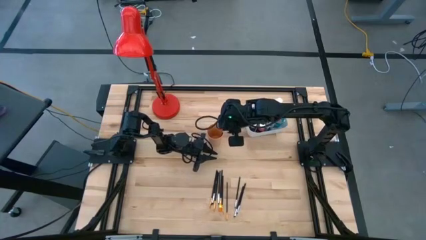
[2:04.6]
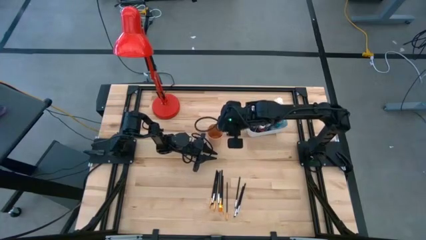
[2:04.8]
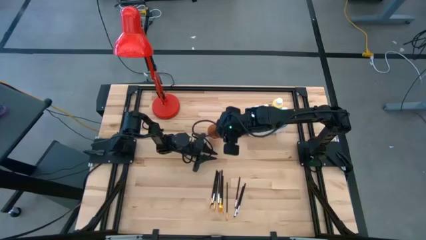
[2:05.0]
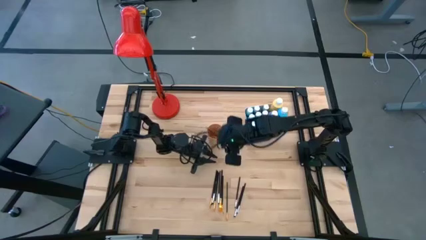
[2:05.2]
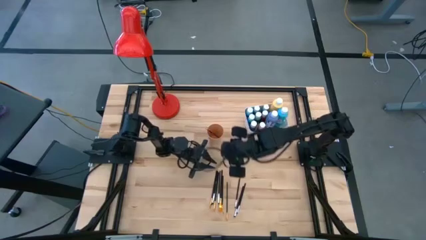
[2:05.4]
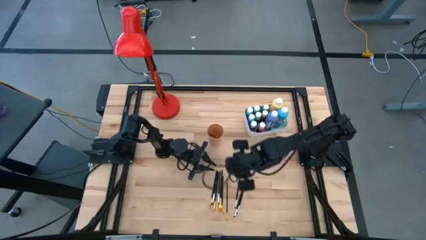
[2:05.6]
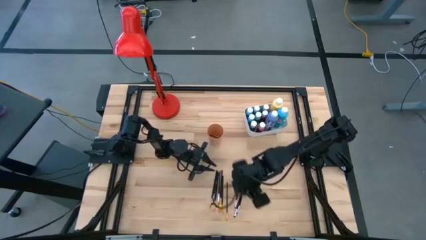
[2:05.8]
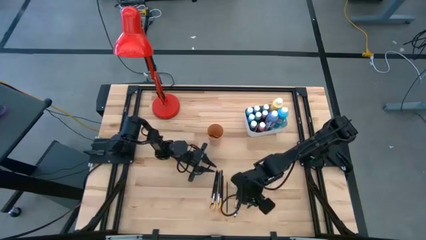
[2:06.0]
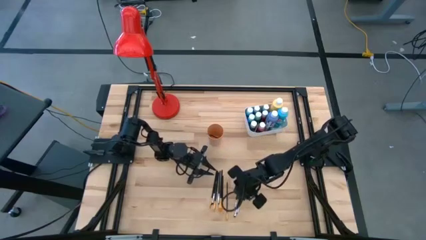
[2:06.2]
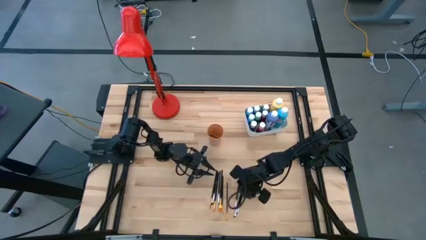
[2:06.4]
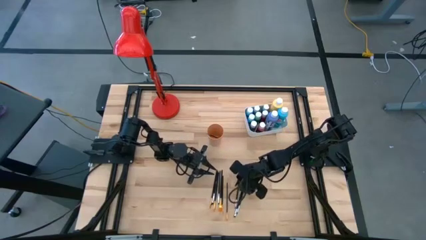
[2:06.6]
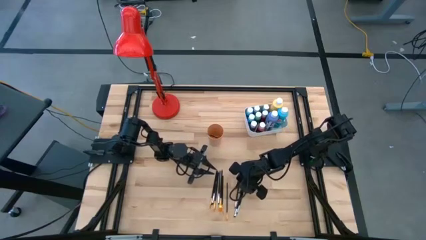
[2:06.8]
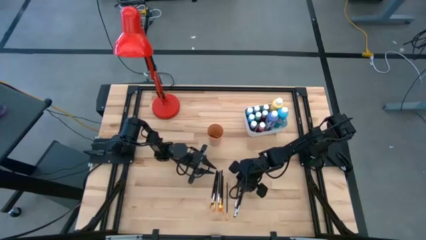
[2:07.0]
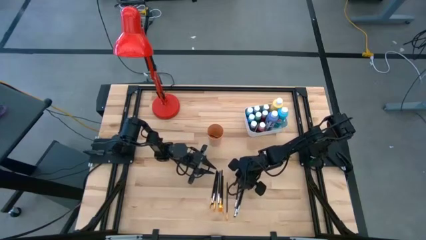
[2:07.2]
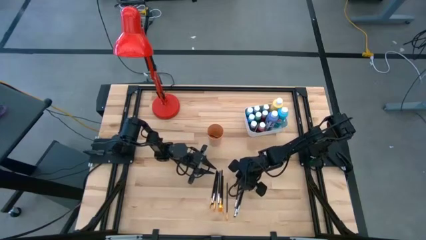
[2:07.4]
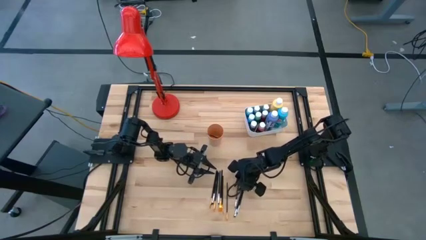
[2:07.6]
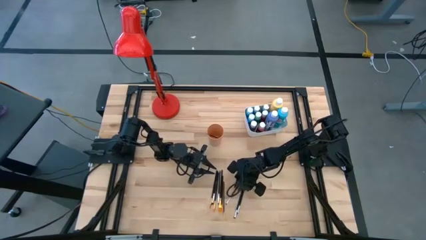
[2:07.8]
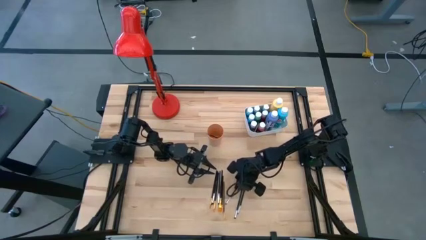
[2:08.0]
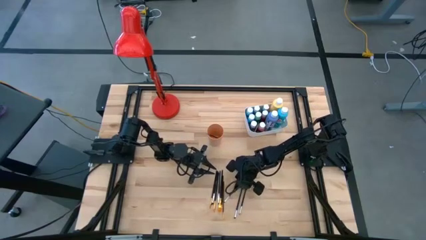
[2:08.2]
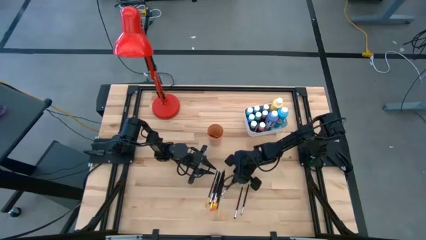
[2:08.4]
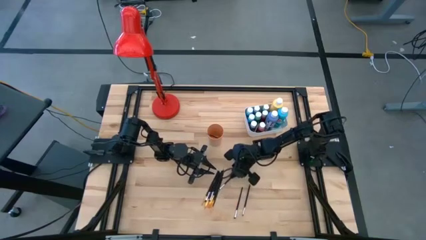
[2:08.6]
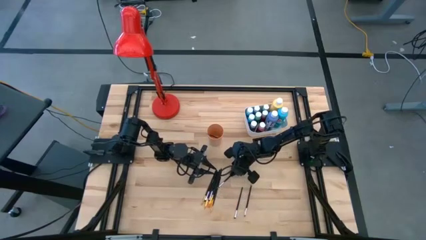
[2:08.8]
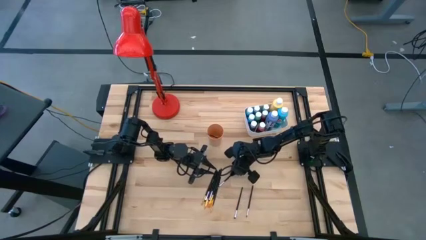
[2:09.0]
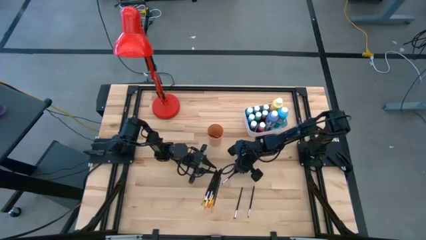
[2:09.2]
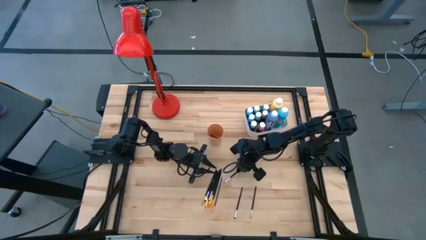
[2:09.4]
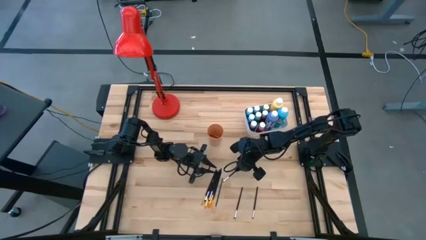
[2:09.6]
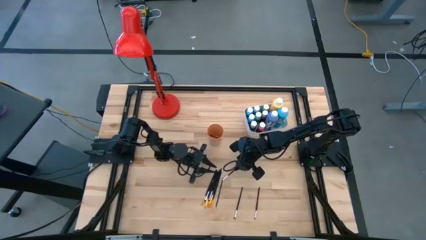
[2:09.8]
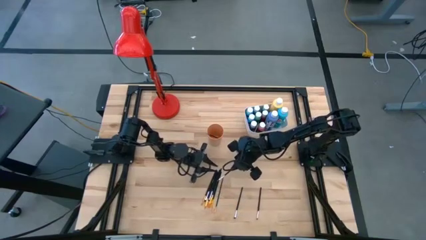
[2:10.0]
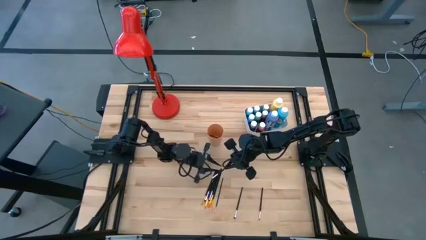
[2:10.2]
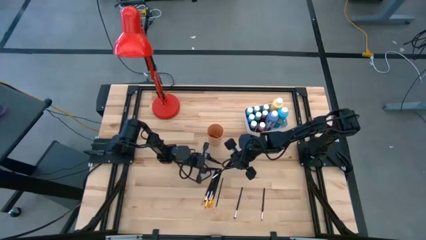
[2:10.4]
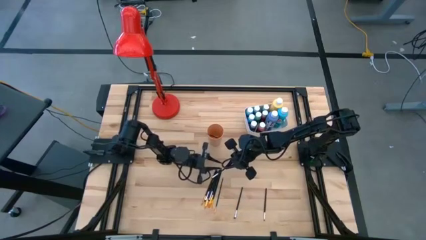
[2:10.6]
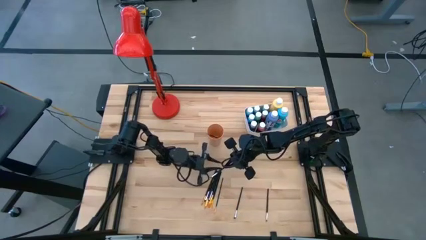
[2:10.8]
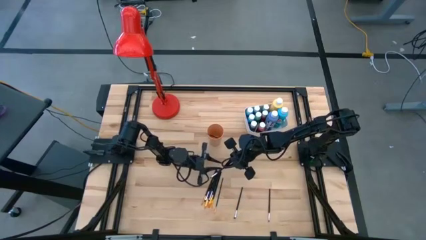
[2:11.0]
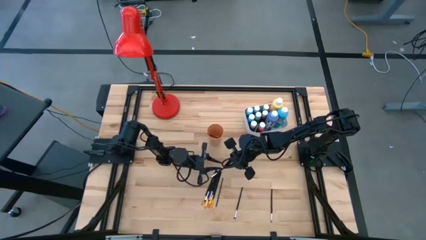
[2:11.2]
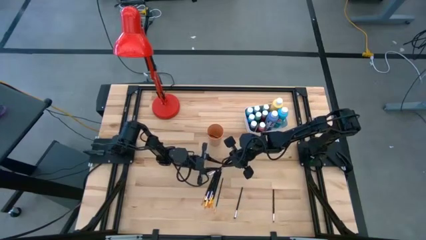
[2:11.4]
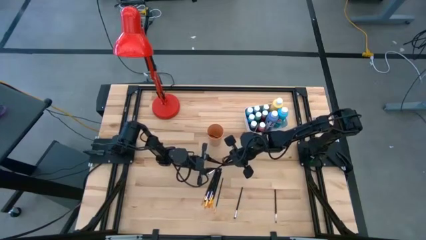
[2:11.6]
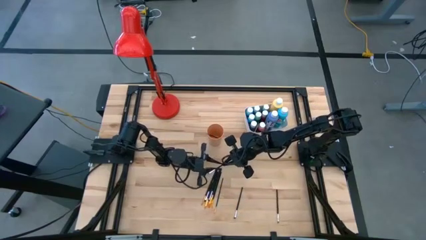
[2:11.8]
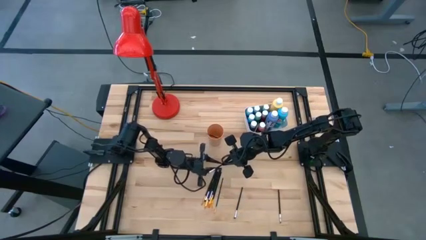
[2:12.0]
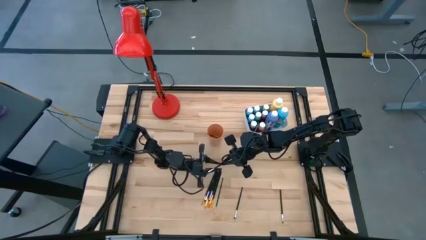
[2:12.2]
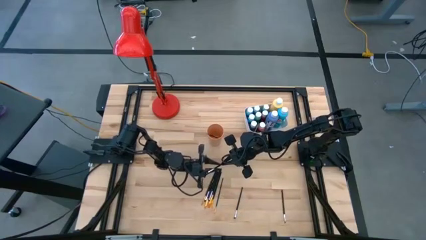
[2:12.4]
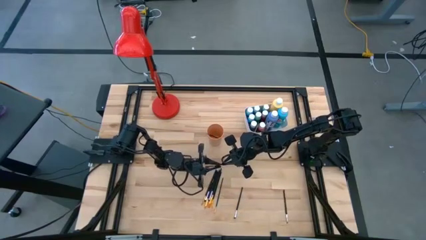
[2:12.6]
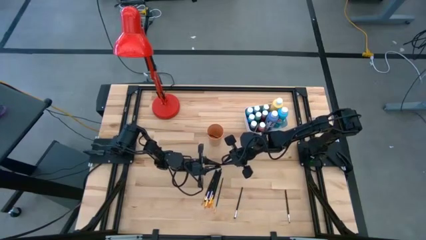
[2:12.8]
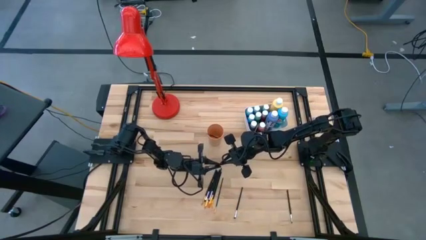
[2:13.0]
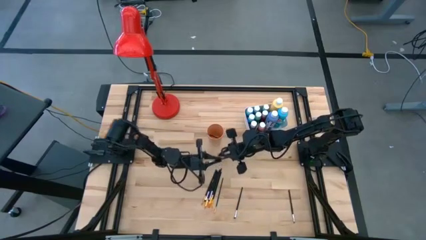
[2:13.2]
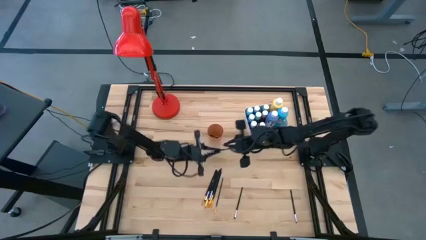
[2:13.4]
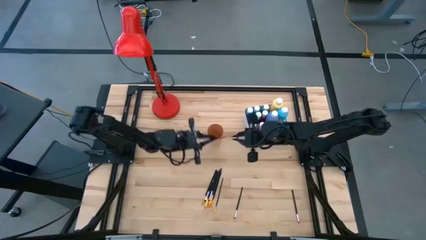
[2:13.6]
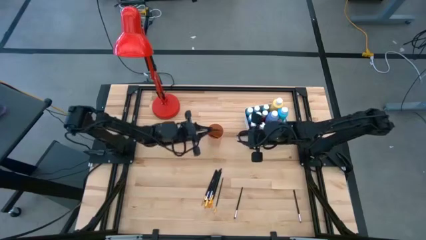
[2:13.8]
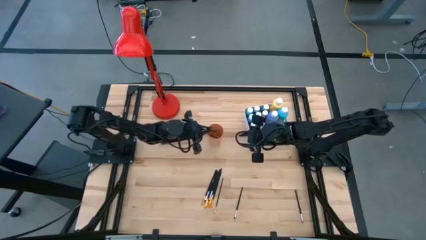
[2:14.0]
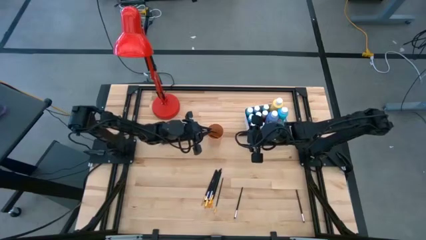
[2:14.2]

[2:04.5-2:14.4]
Task: Pick & Place Paint Supplies
Put the white paintbrush into the orange cup

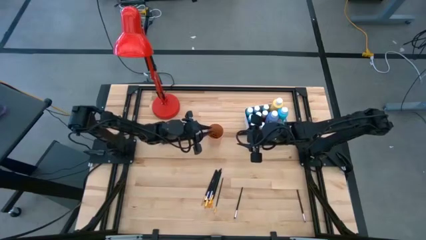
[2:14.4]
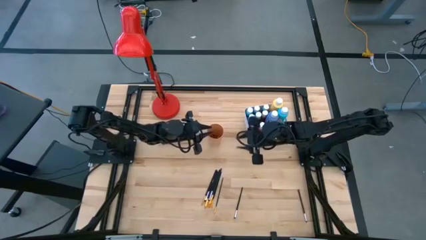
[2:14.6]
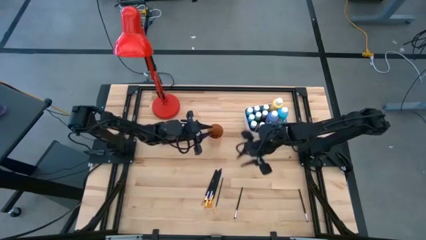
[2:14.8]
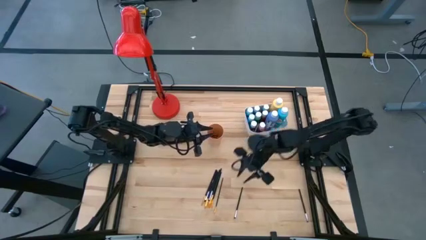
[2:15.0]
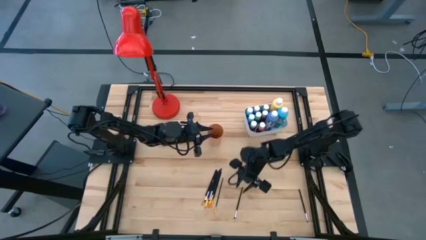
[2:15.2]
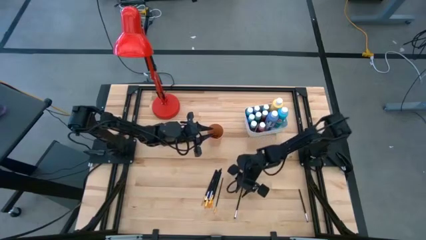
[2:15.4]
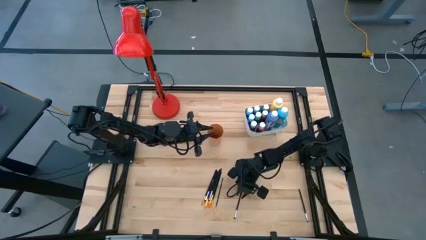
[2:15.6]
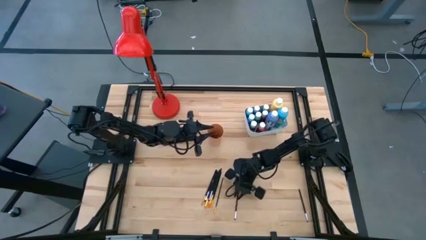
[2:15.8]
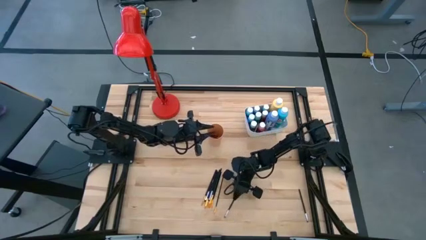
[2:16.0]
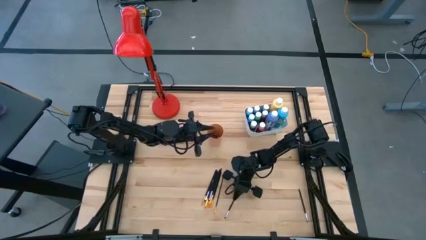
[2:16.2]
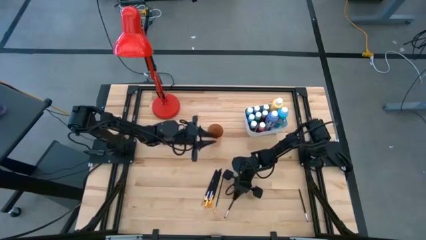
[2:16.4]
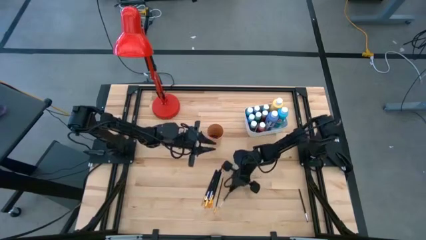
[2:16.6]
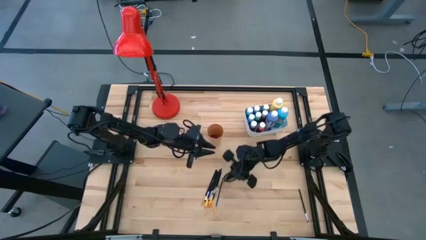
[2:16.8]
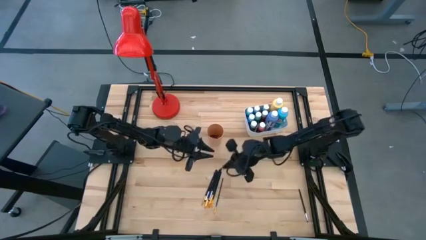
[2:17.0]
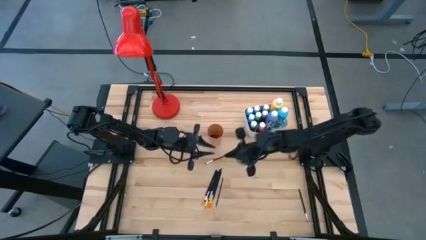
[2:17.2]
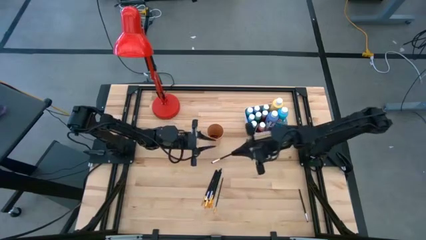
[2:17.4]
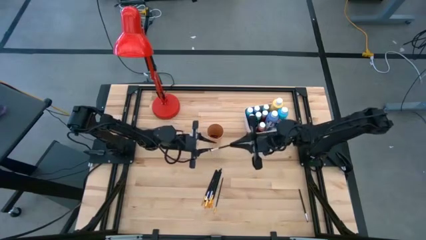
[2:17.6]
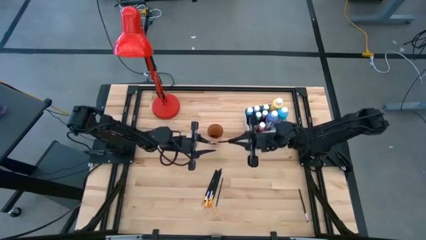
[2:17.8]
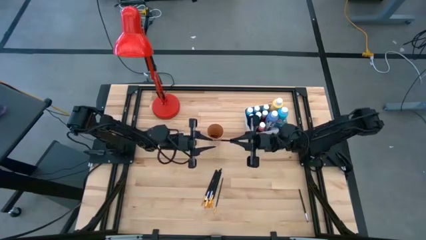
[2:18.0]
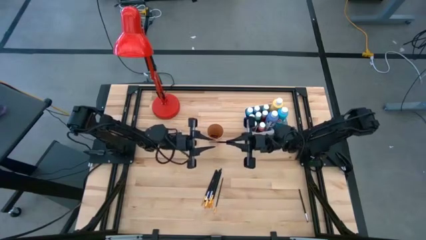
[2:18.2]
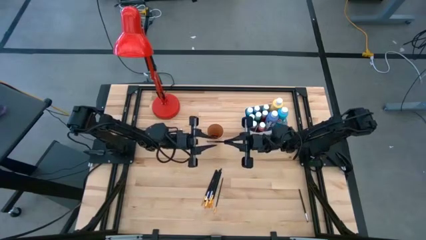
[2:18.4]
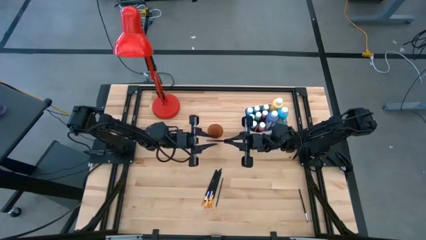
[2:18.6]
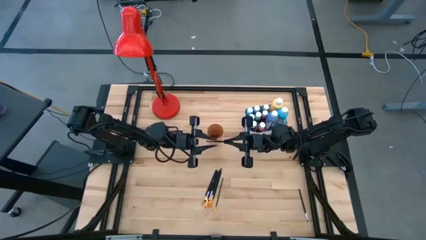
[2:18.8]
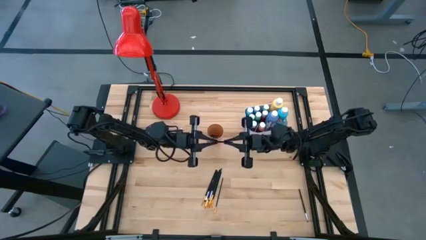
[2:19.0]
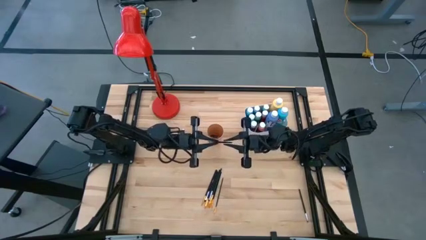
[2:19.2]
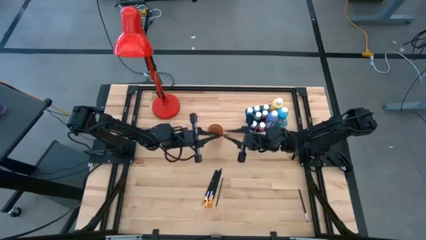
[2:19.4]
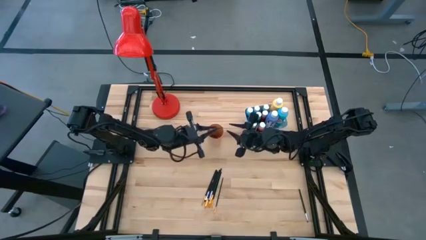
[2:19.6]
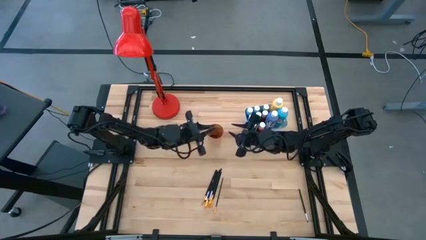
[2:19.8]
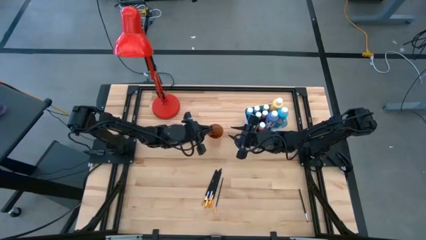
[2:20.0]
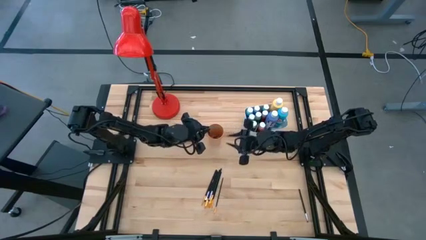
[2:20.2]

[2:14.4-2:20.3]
Put the white paint brush into the orange cup
